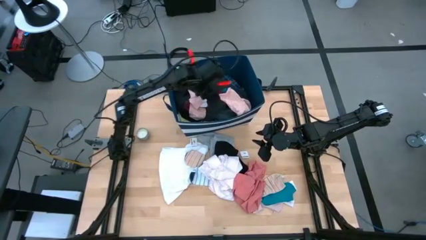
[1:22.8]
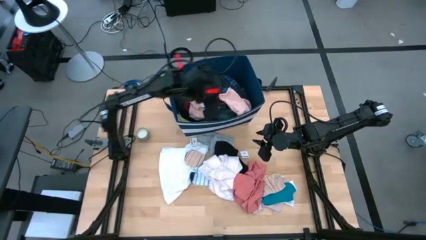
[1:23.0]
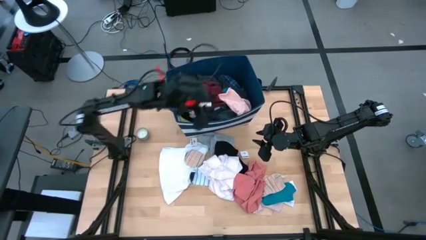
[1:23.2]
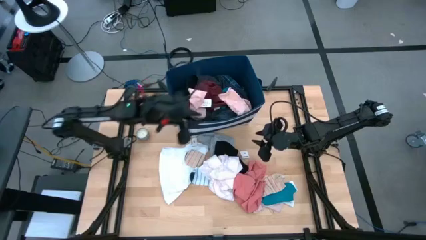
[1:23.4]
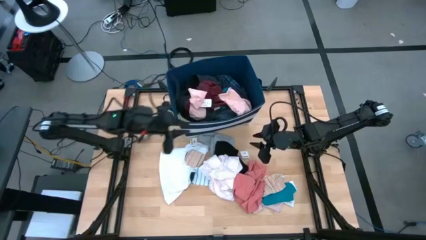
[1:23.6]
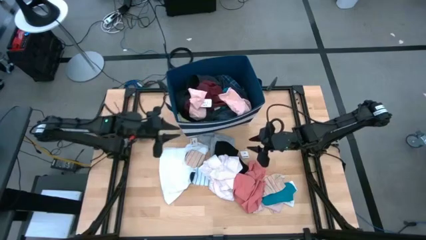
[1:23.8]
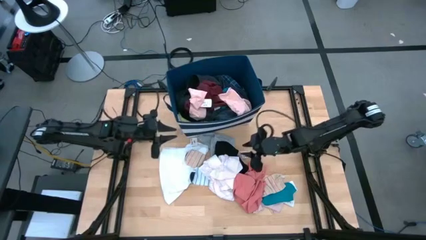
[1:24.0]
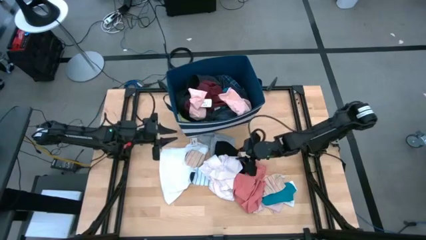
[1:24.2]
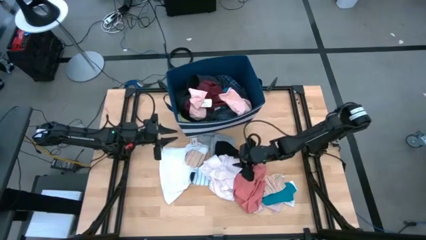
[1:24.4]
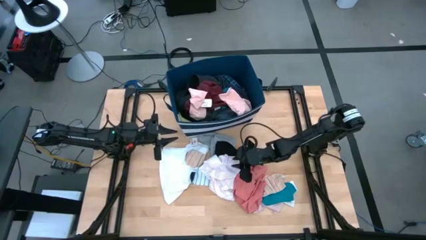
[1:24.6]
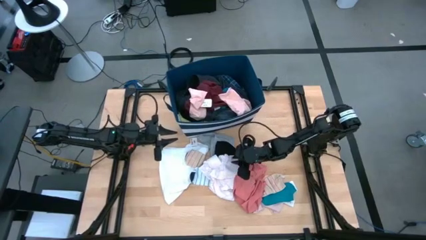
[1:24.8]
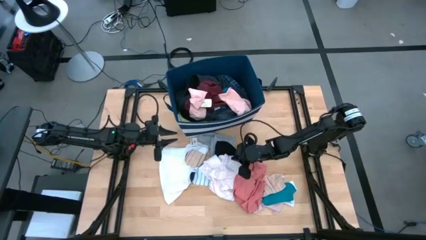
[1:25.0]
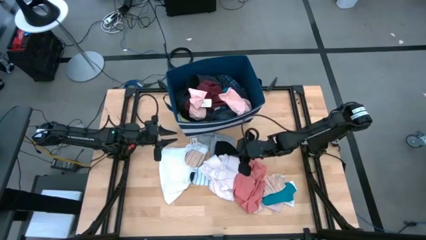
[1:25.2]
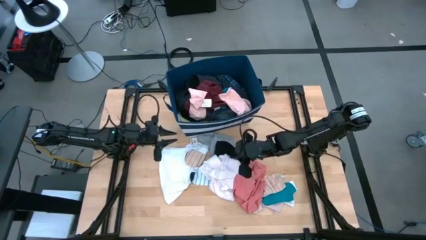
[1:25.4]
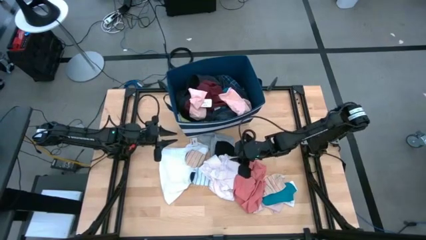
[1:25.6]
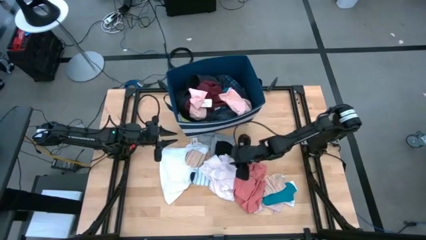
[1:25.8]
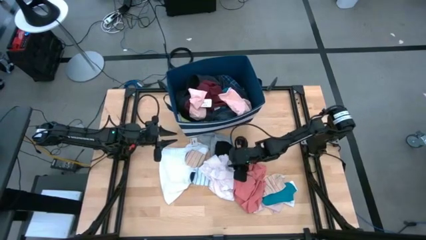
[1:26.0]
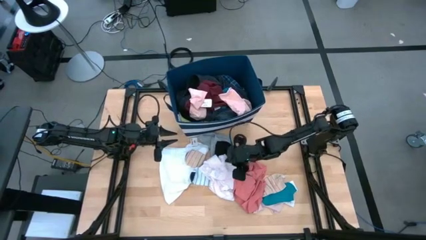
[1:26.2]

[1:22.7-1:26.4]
Task: Sort clothes
Put the white underwear into the blue laundry bin

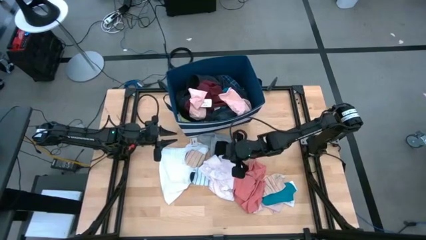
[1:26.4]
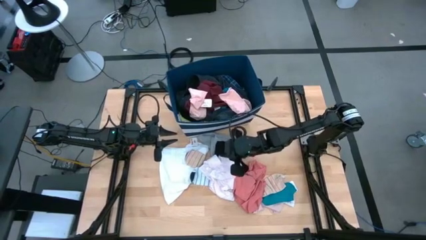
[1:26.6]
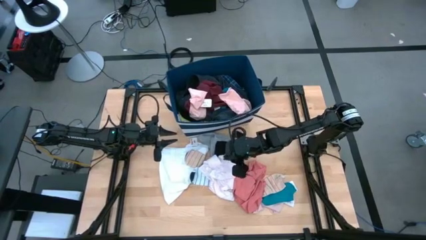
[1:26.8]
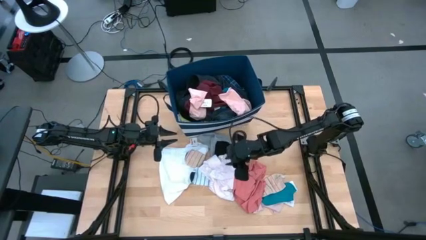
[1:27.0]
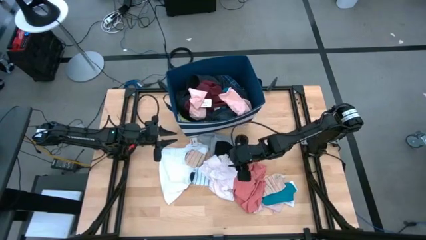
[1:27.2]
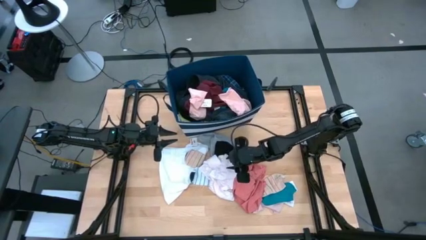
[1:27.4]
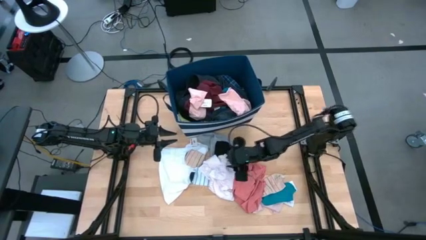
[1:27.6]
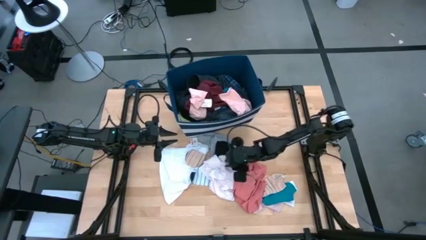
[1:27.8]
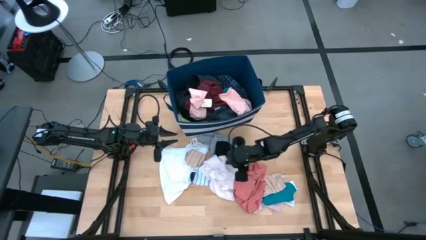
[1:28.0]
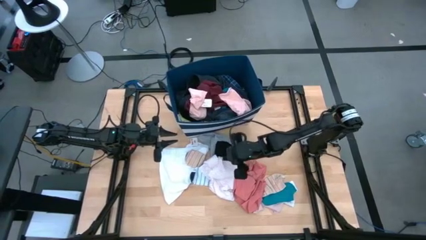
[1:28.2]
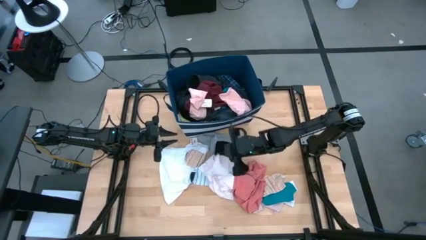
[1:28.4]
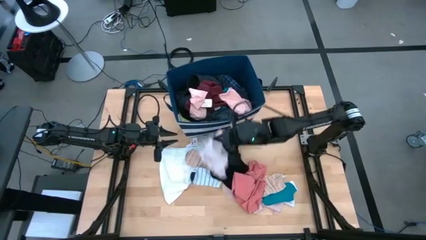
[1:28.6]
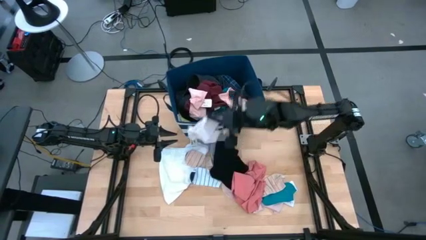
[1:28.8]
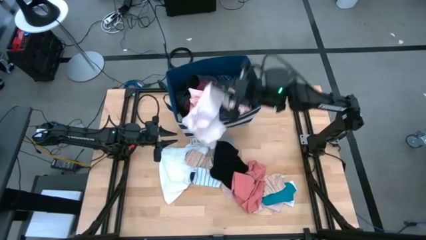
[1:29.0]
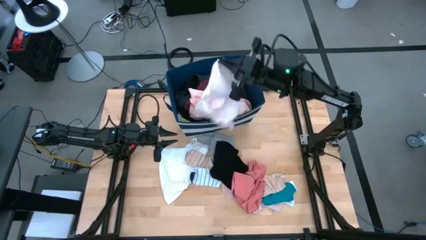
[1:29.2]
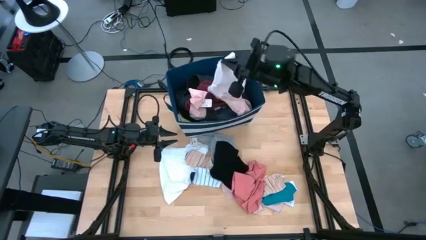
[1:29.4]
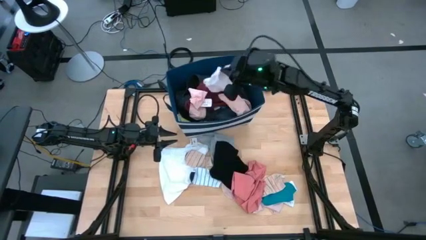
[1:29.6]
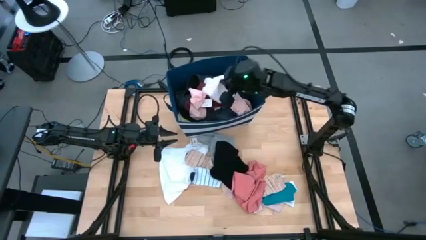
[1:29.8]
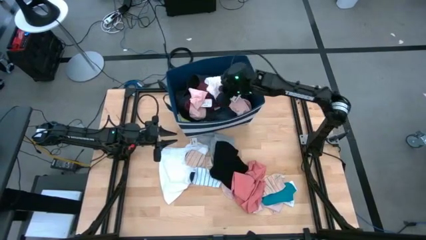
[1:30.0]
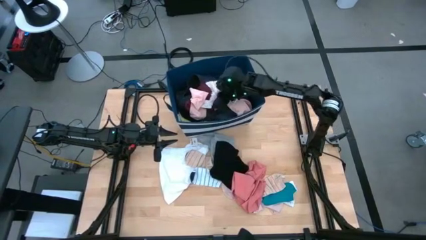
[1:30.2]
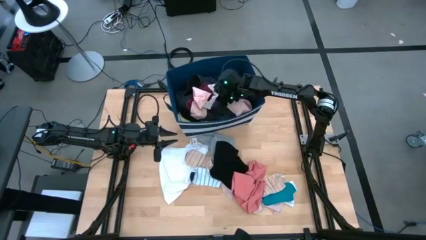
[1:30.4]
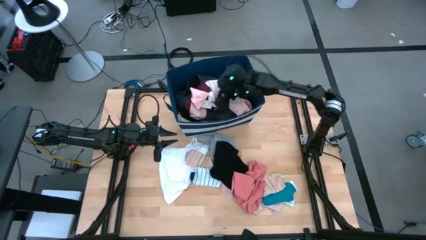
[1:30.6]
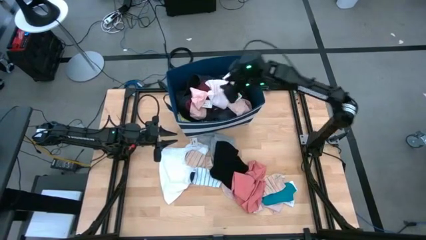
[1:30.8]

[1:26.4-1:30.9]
Put the white underwear into the blue laundry bin

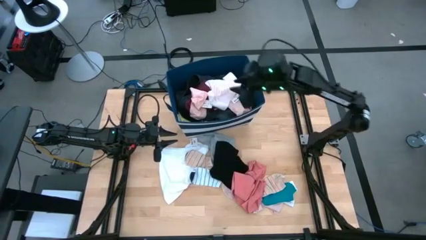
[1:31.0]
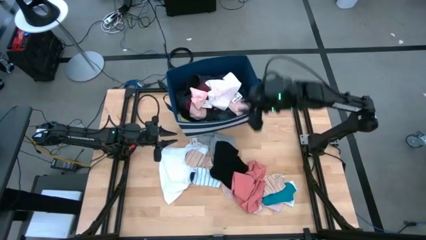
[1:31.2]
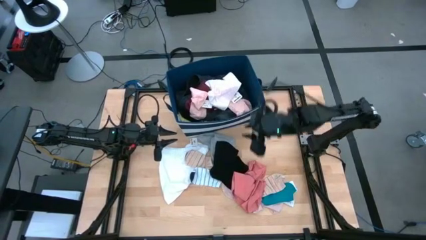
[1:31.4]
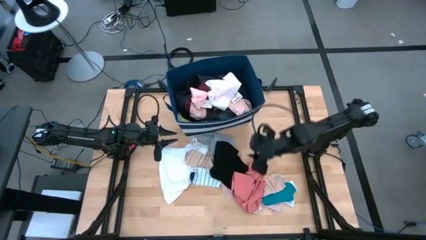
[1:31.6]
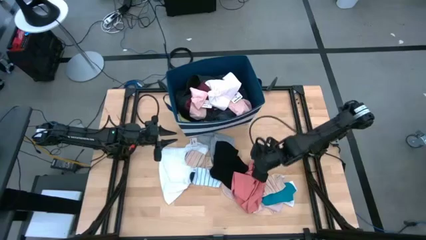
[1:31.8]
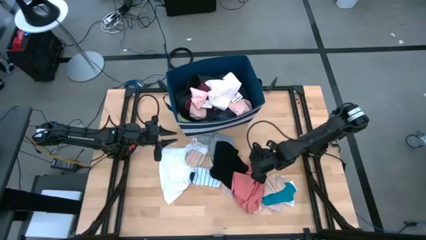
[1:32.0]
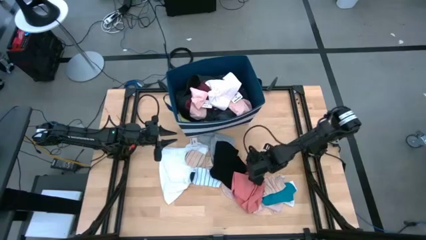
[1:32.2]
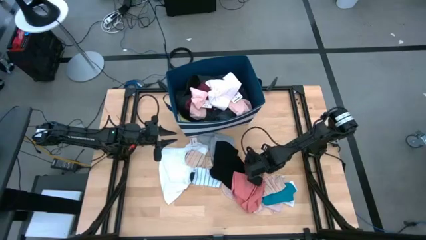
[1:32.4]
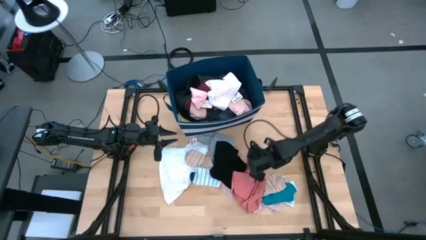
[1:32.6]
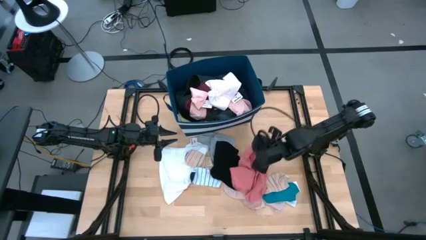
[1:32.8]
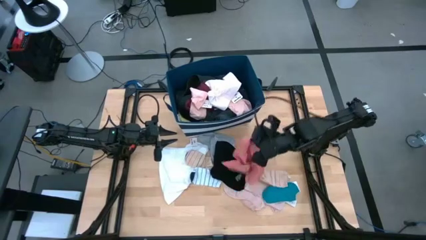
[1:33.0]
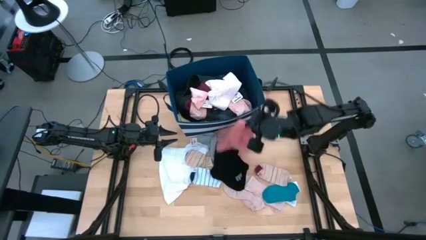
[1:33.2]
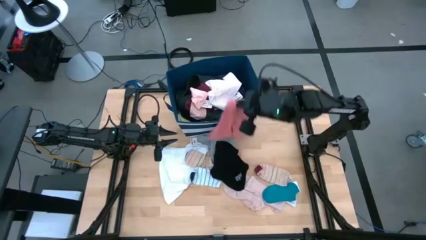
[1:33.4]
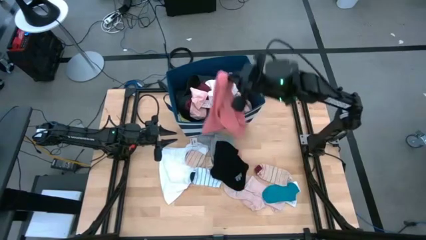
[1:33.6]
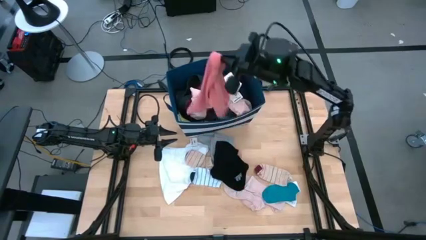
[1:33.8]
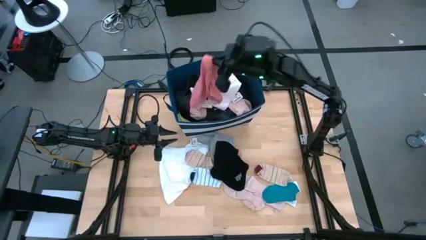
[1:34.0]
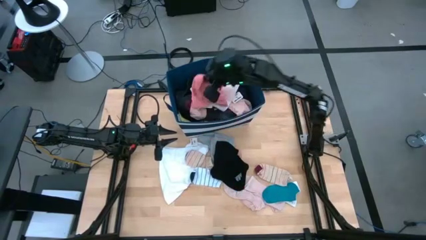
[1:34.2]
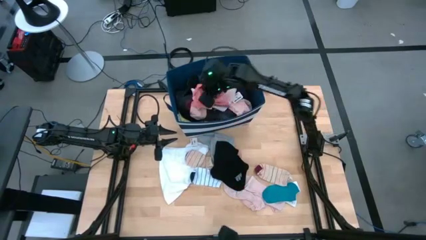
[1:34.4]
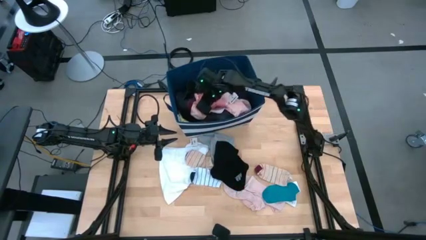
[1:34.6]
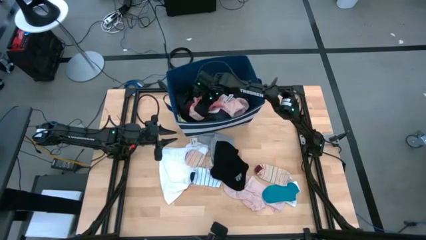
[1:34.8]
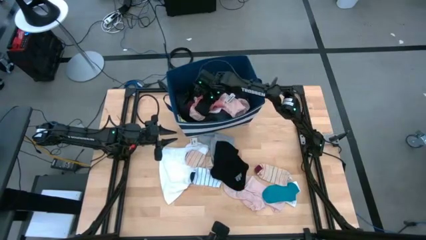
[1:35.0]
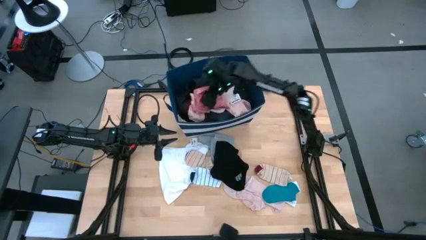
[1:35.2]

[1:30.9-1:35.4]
Put the pink underwear into the blue laundry bin

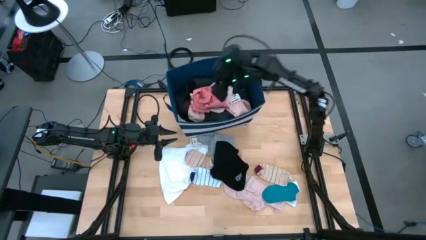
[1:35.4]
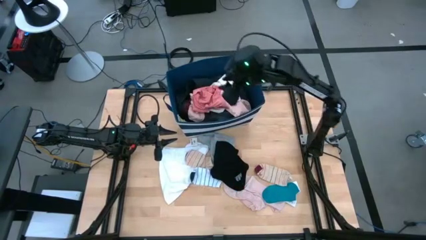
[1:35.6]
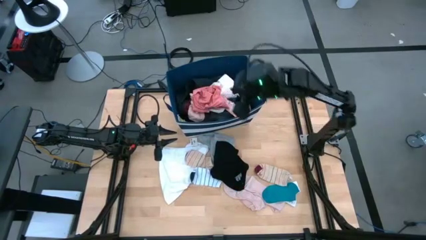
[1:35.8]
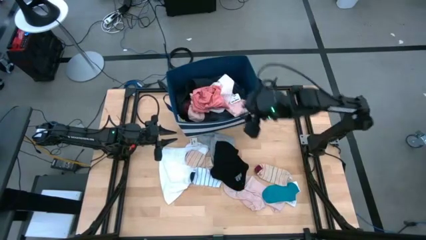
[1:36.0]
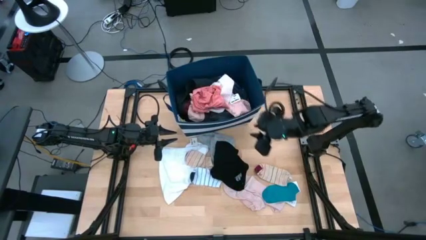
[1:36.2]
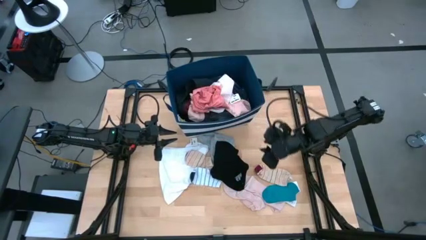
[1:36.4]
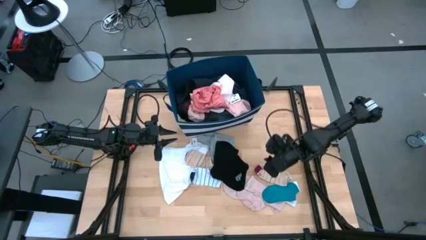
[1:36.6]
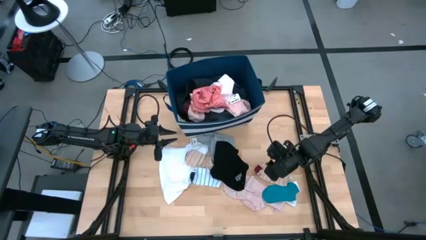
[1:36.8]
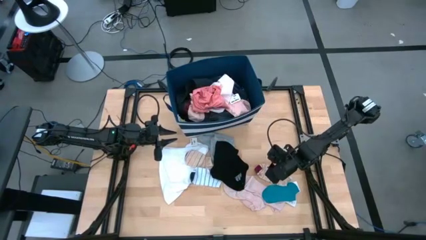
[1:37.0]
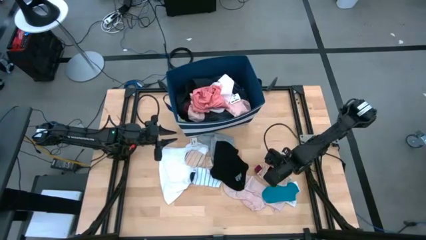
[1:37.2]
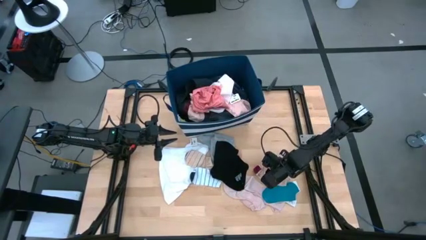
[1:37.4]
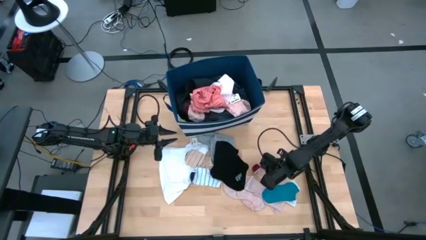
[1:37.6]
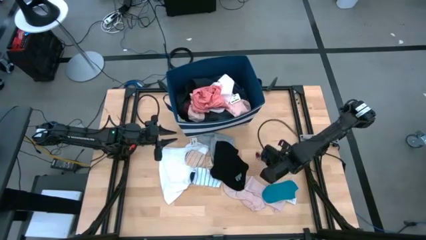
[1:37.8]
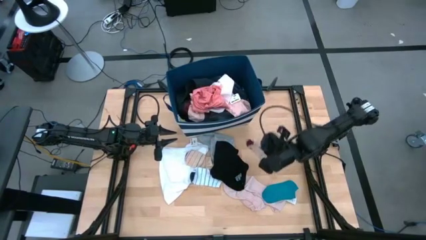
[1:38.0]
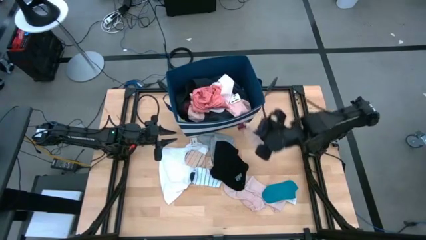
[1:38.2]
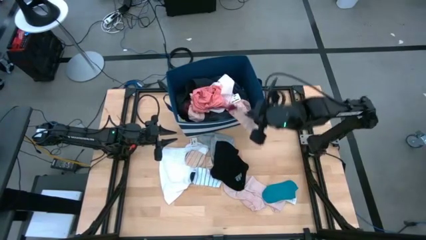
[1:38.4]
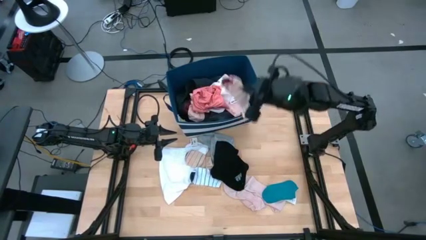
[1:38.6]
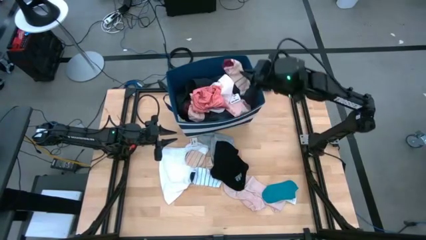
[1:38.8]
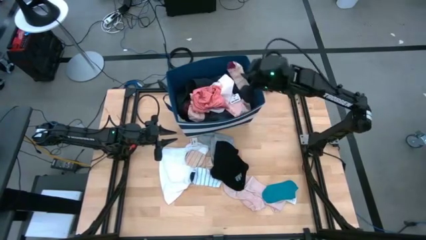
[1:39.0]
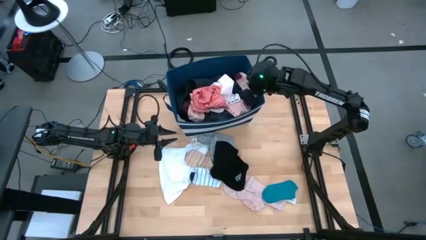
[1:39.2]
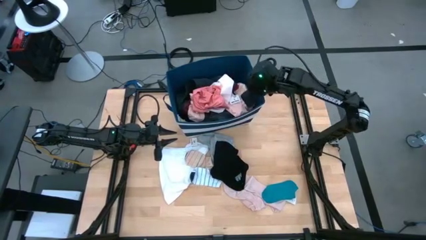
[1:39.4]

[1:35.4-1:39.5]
Put the right brown patterned sock into the blue laundry bin
